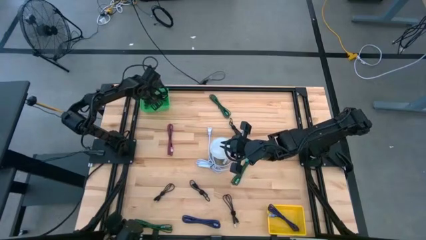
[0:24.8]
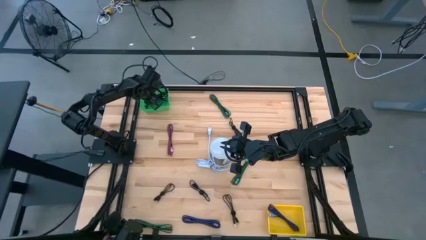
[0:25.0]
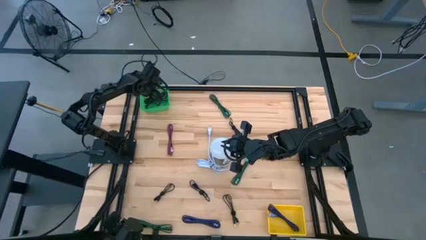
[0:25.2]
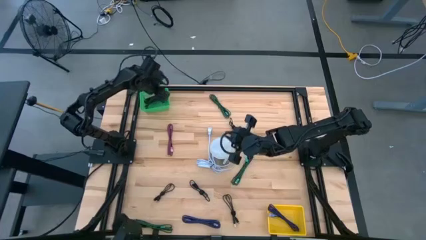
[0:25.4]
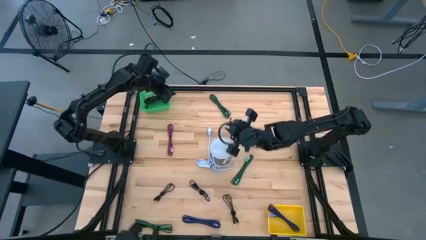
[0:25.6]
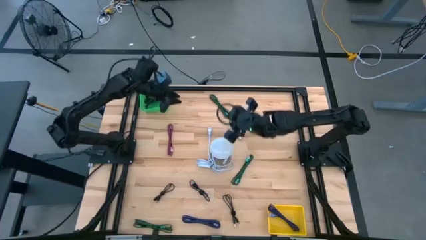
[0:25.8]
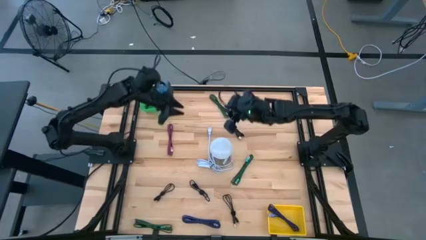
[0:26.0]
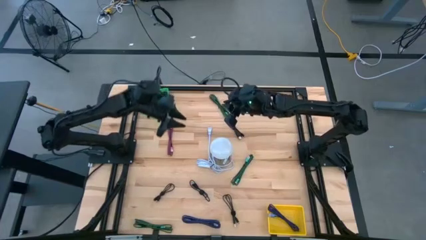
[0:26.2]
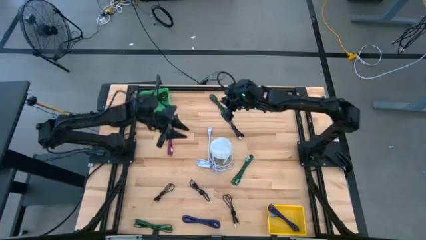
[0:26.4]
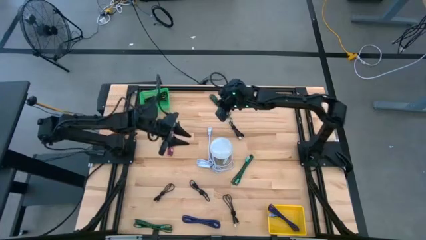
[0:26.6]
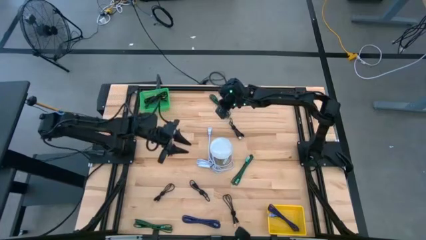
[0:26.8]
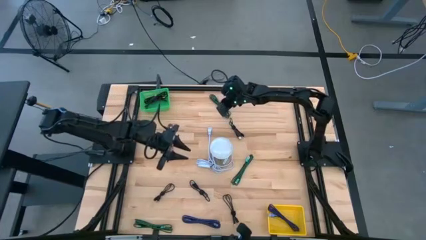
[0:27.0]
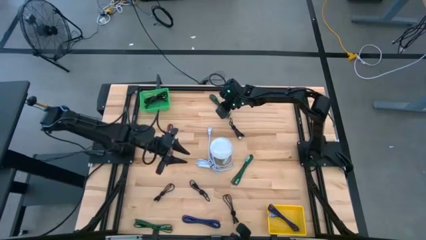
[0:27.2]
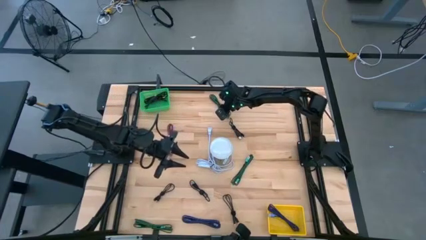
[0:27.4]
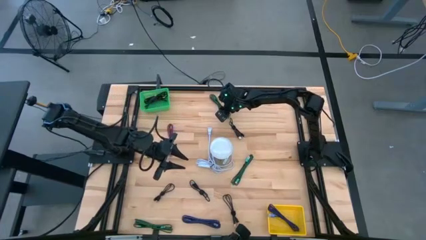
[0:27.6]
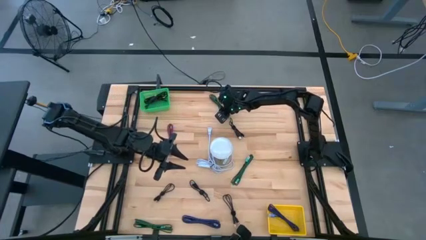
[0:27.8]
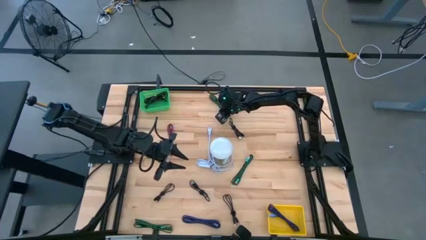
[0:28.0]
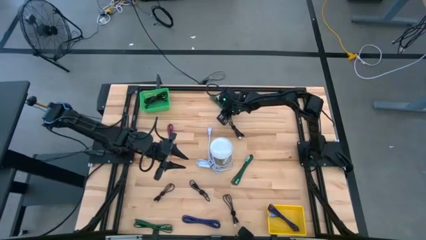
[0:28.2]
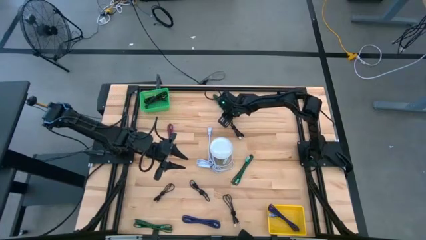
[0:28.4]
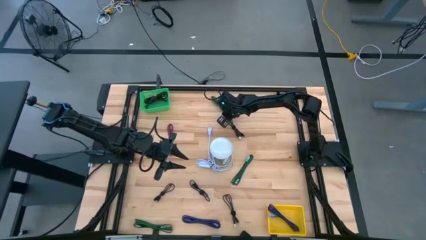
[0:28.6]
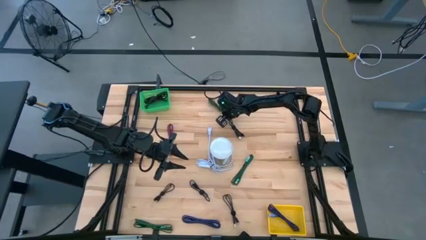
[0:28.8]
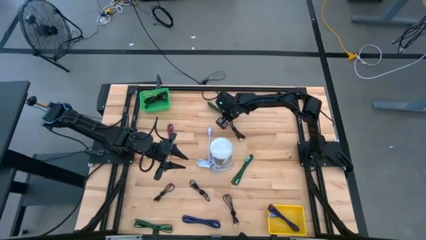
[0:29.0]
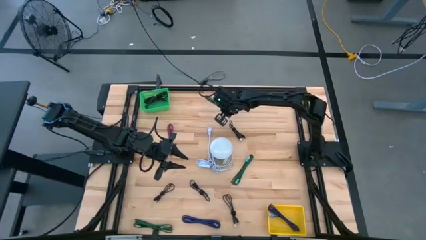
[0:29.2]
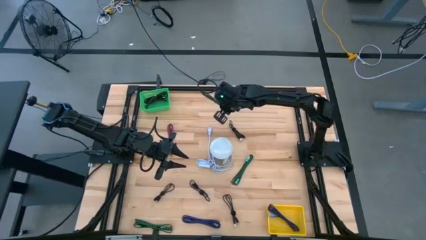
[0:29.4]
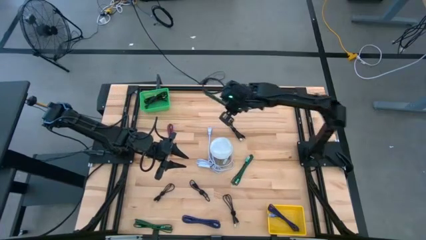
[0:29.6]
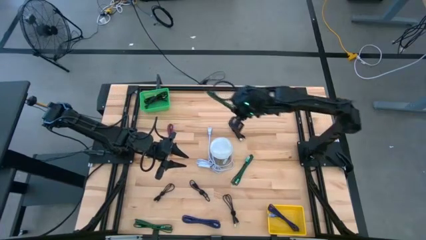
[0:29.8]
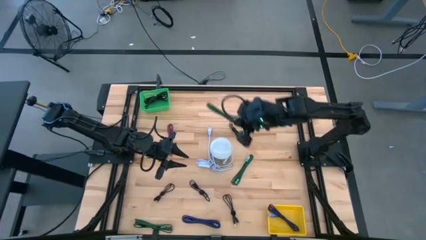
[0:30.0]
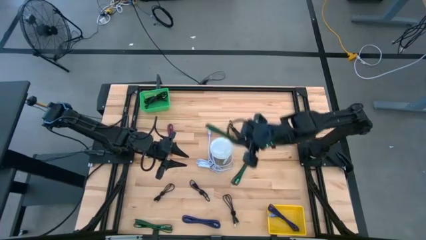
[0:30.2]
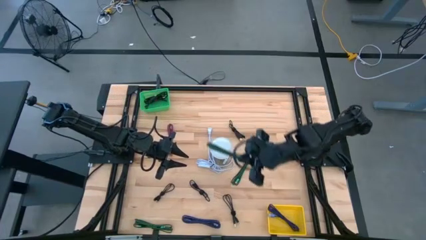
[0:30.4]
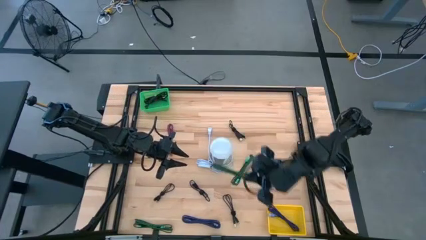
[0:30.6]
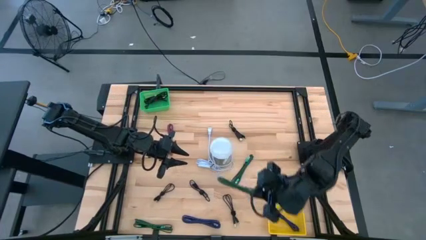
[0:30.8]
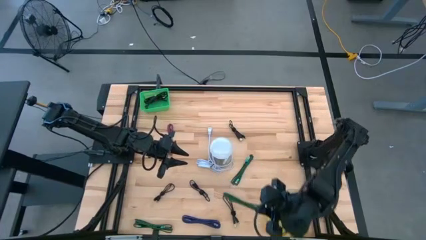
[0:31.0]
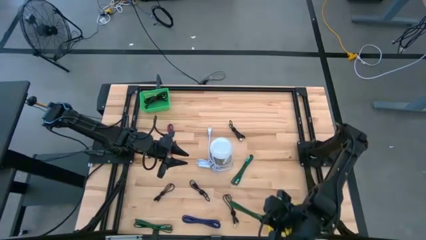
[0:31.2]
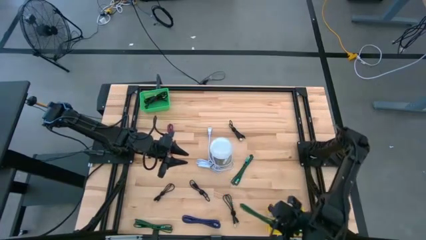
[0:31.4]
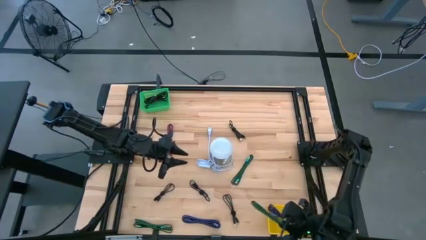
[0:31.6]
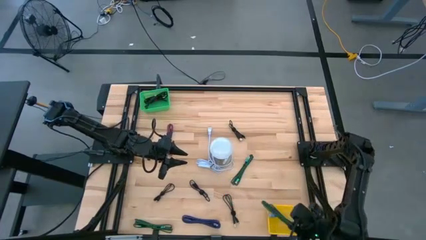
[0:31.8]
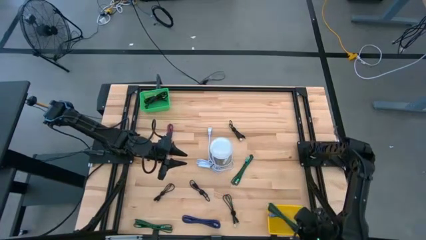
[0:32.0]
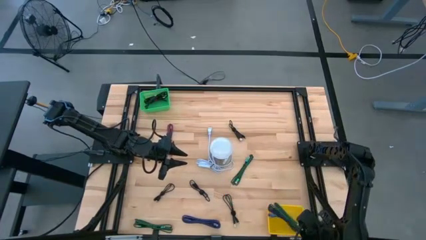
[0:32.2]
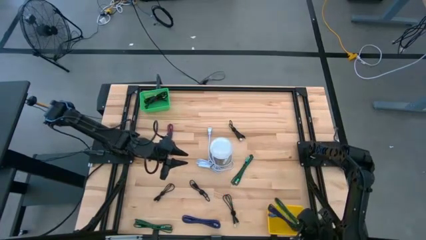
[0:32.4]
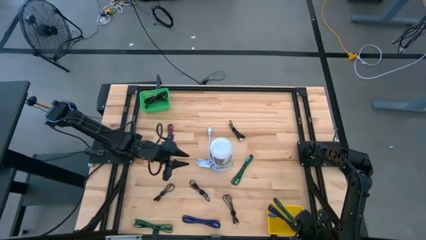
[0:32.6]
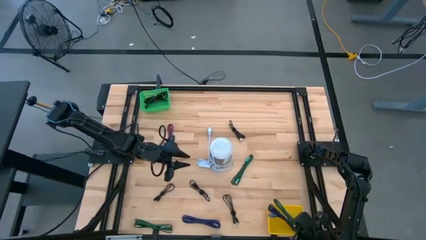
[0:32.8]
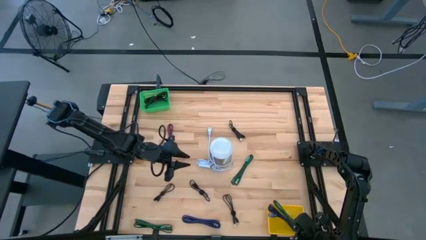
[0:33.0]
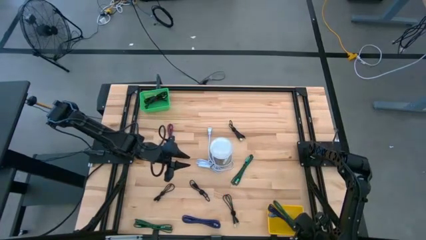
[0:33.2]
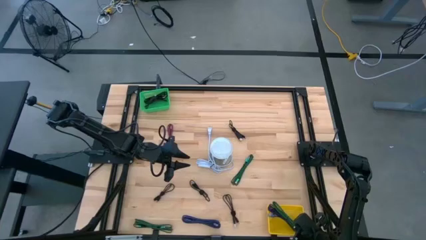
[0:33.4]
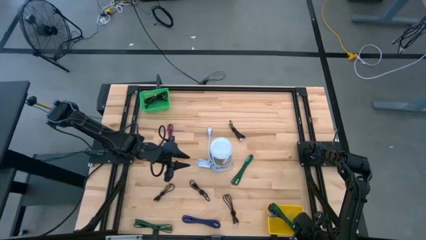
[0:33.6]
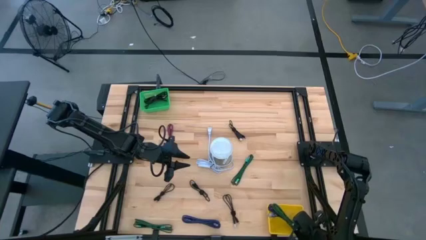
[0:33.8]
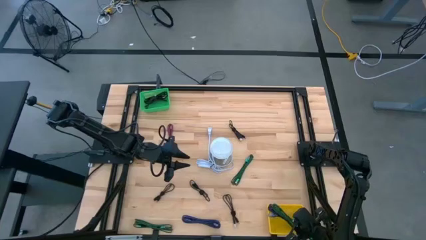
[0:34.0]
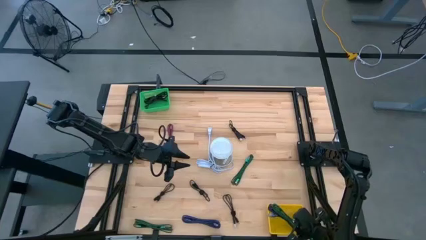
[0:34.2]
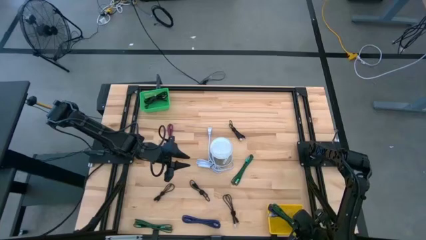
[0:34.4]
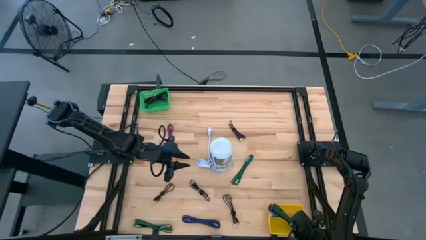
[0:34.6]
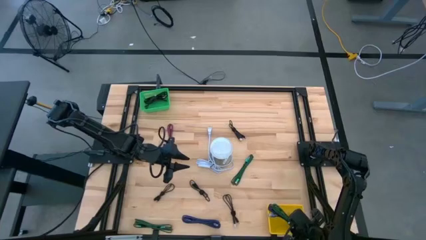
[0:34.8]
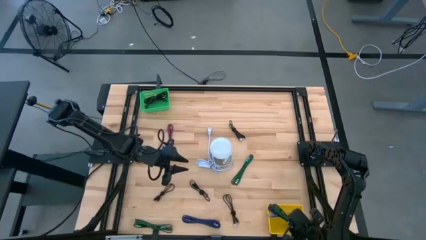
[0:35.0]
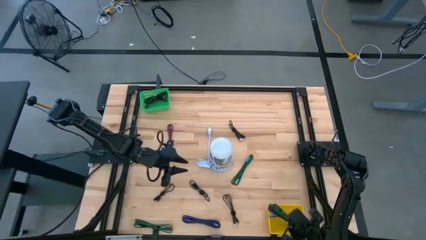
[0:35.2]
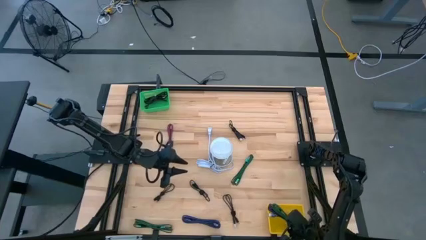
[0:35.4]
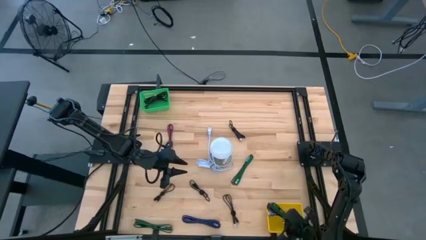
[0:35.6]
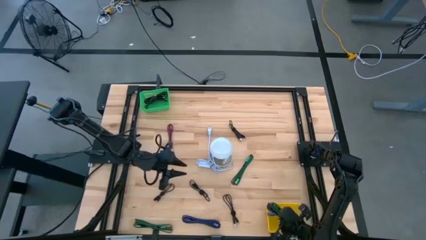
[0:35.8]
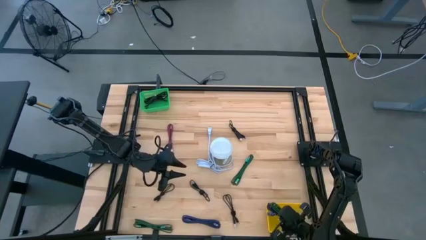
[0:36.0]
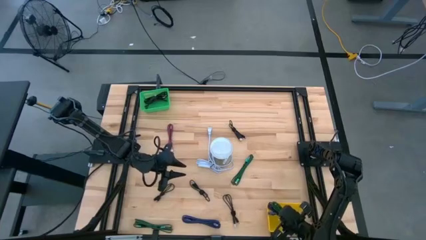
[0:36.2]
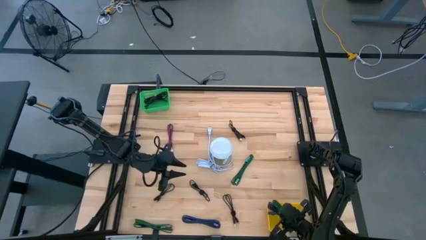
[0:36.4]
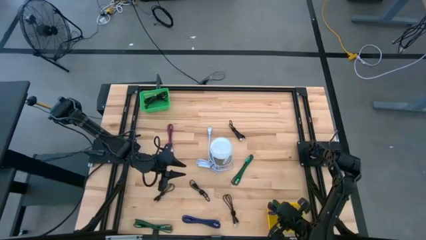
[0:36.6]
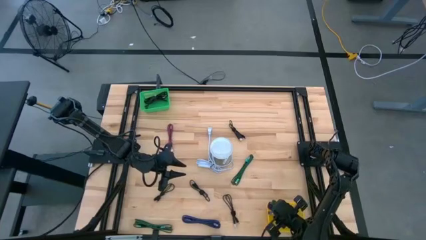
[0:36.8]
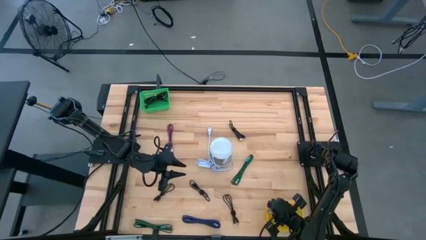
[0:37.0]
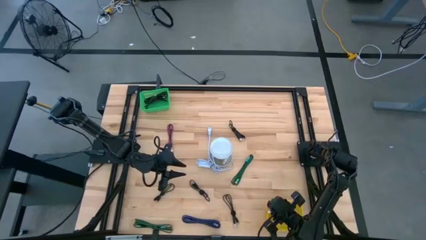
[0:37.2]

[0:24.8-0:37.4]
Task: Pick & Place USB Port
Put the green black charger cable into the yellow basket

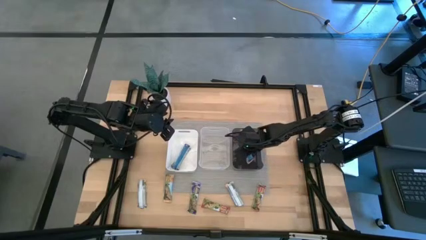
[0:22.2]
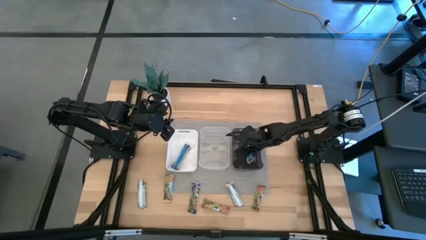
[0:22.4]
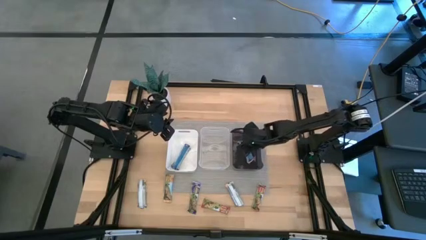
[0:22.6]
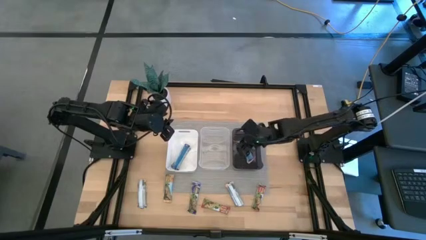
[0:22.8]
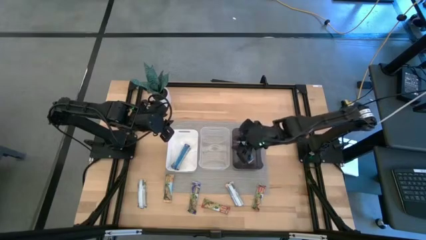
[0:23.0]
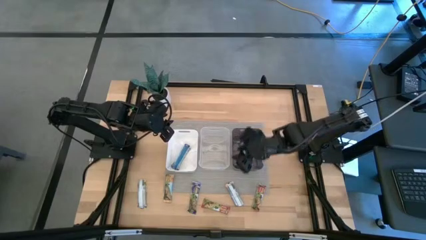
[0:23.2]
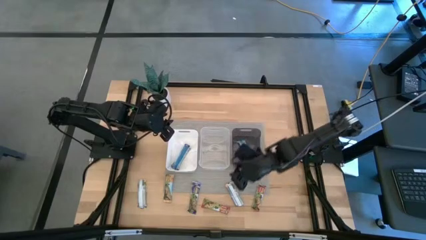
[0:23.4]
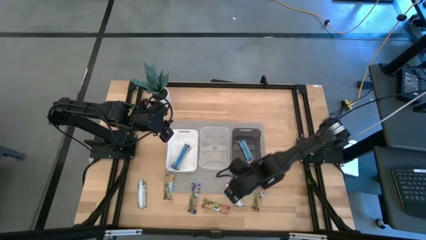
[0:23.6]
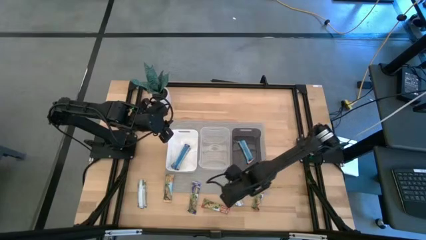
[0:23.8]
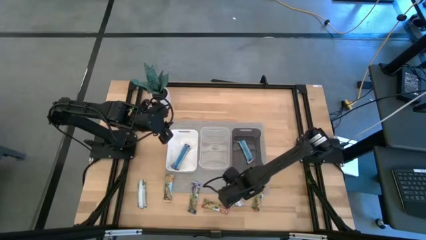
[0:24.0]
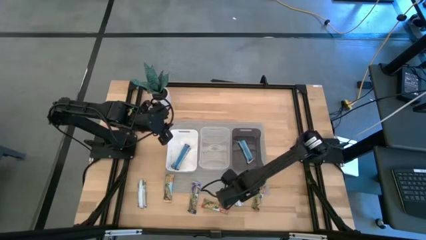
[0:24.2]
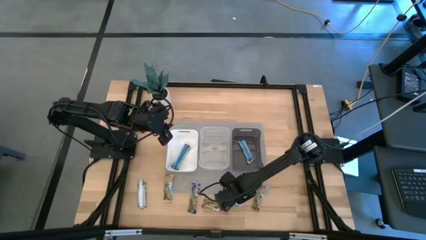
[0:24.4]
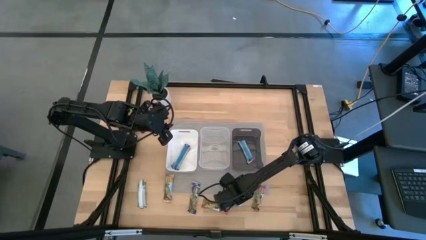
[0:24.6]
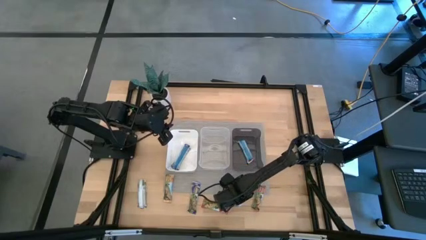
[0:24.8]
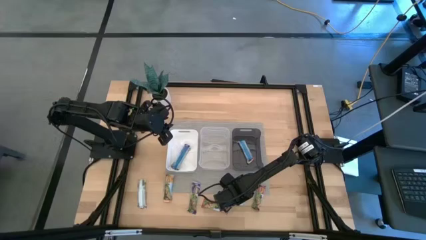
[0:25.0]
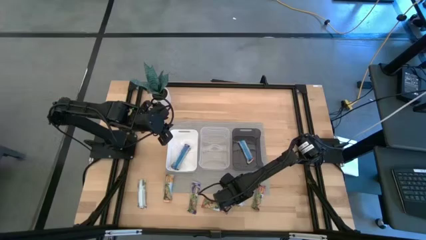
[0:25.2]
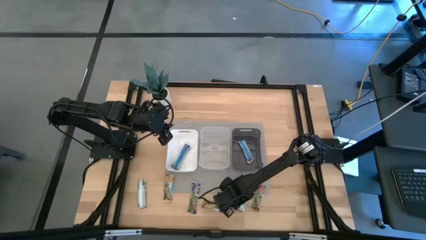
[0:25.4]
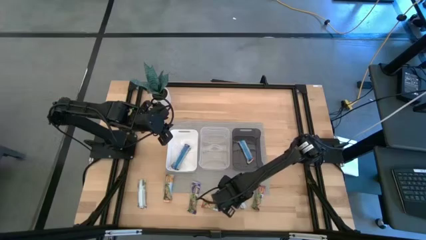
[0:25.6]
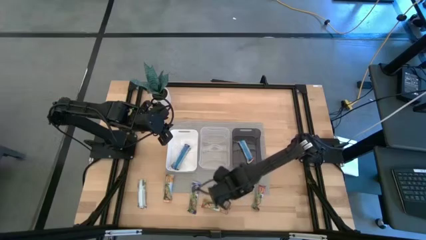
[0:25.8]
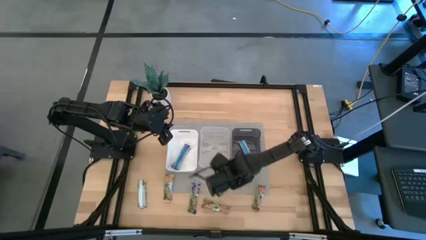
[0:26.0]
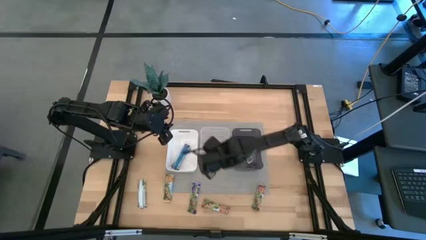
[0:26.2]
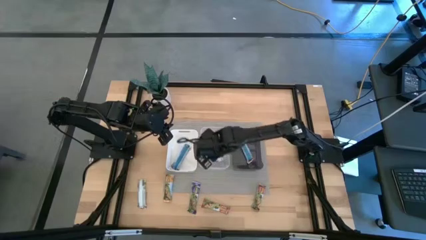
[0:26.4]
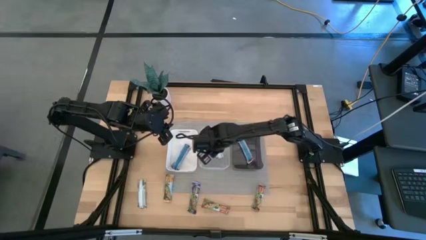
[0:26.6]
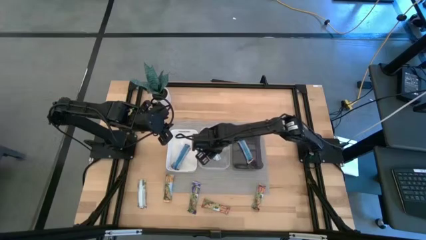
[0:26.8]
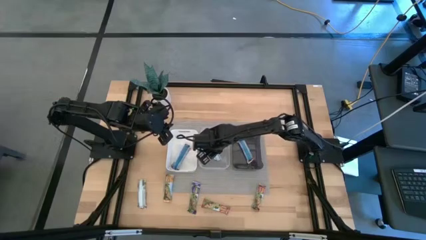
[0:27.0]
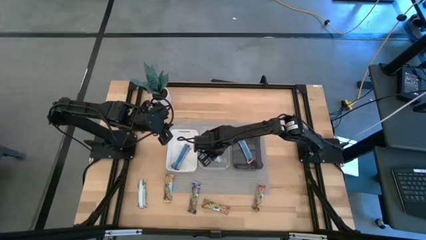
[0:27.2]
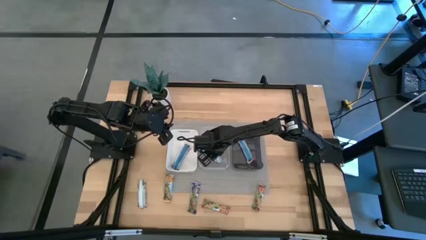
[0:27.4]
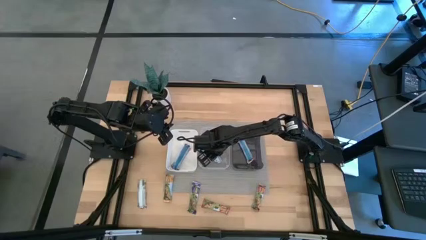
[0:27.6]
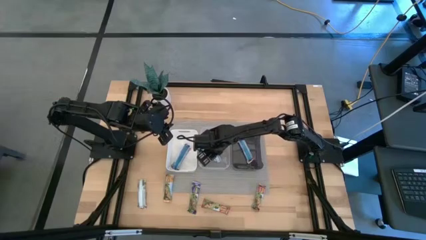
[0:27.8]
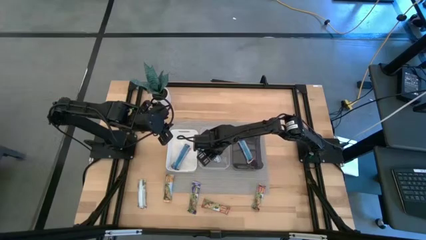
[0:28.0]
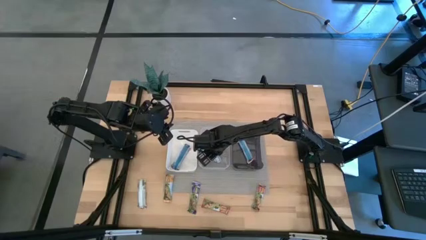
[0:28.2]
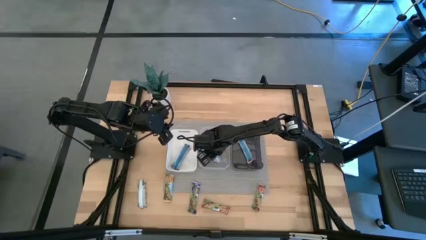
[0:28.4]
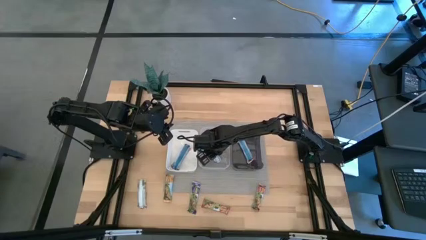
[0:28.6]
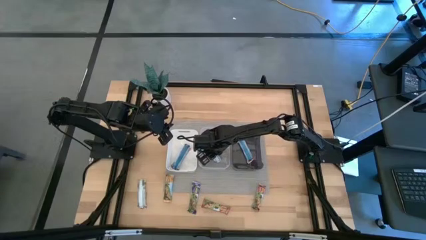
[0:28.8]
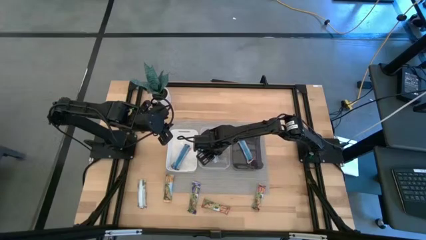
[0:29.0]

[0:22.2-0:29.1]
Task: Pick and place Granola Bars by type
Put the right orange granola bar into the transparent bin
